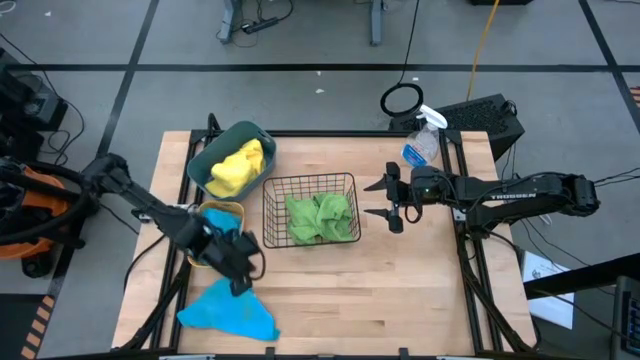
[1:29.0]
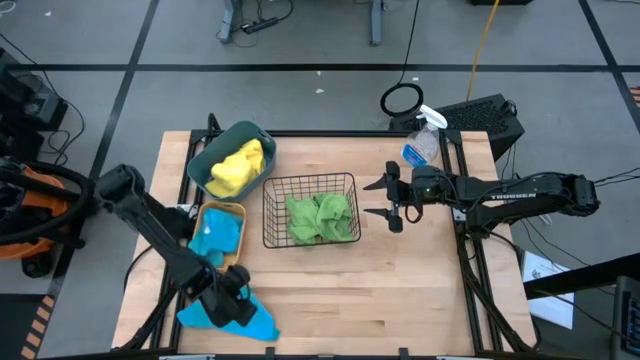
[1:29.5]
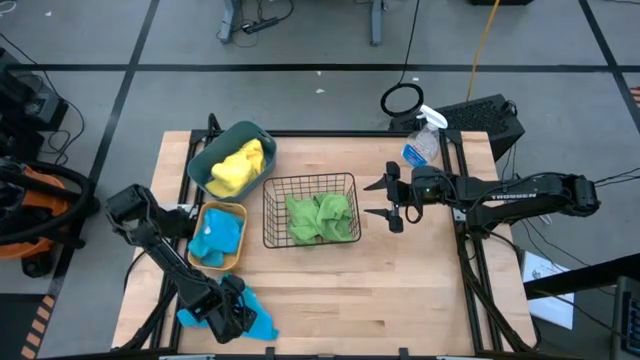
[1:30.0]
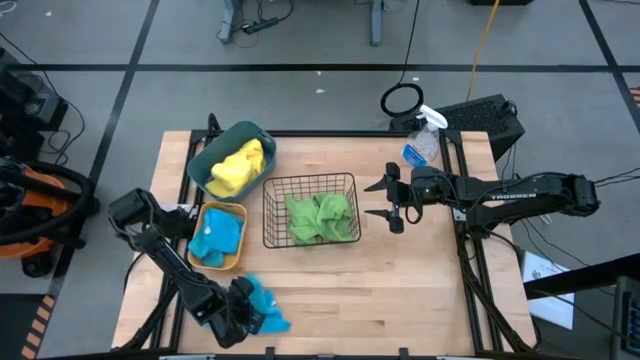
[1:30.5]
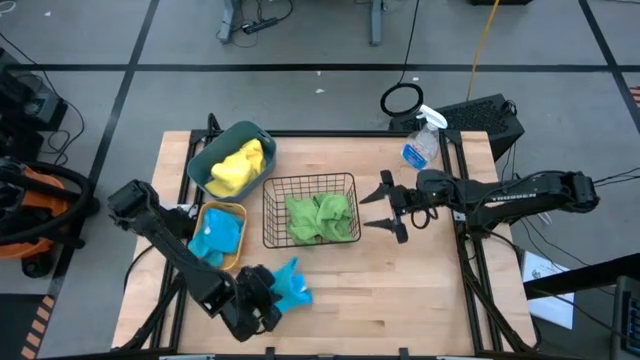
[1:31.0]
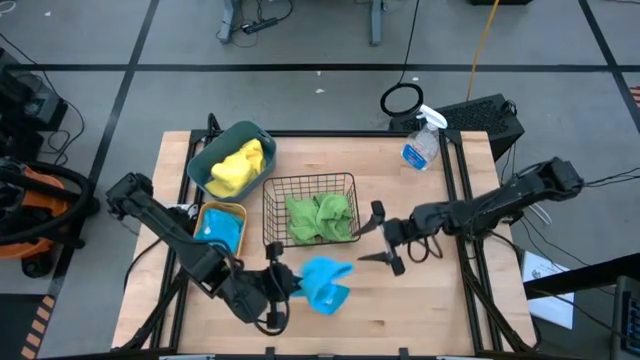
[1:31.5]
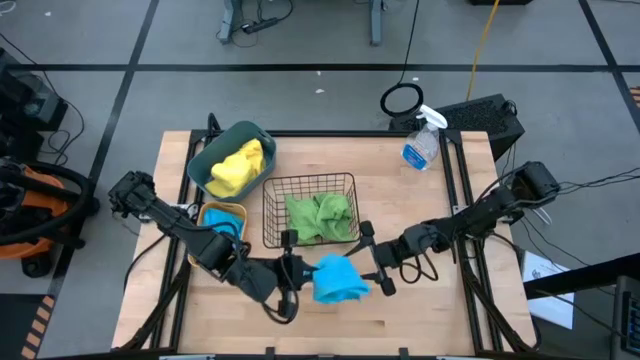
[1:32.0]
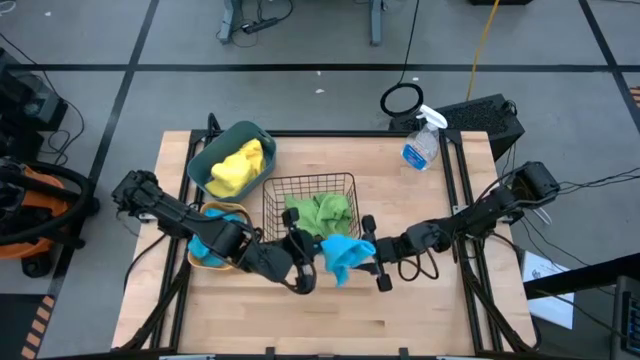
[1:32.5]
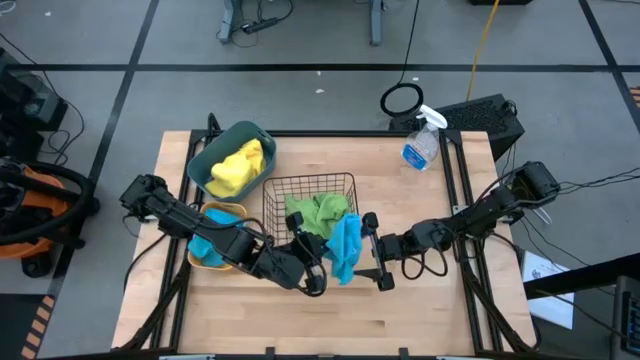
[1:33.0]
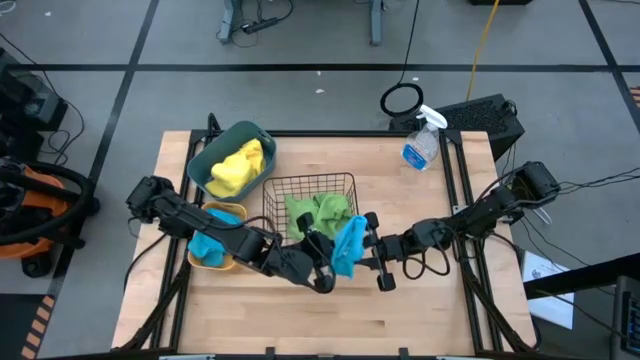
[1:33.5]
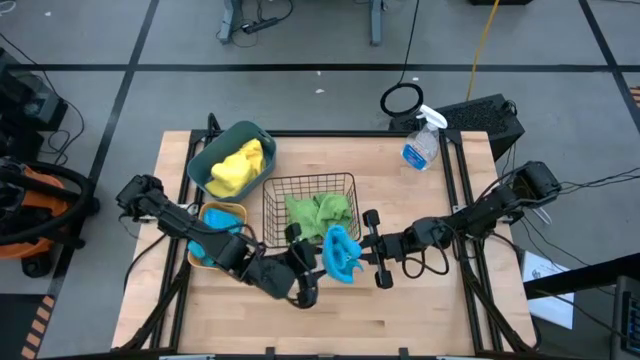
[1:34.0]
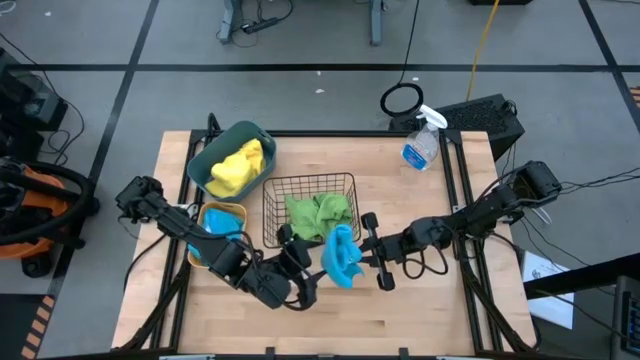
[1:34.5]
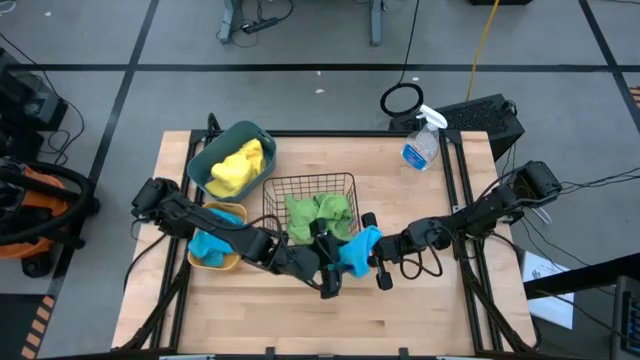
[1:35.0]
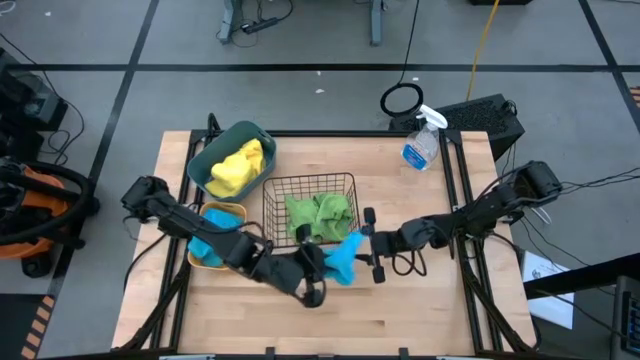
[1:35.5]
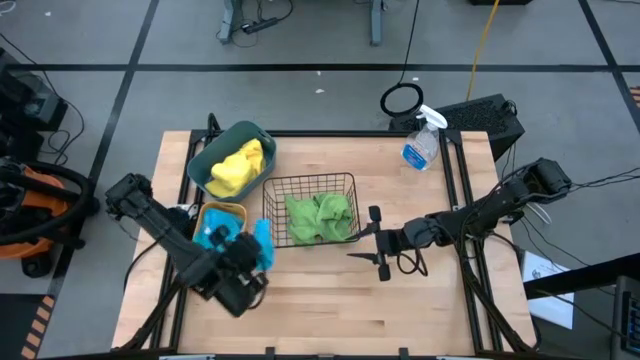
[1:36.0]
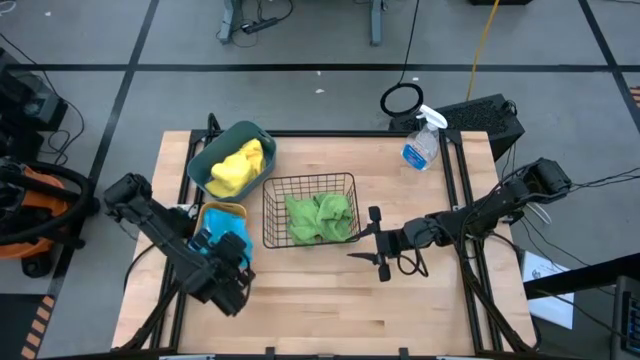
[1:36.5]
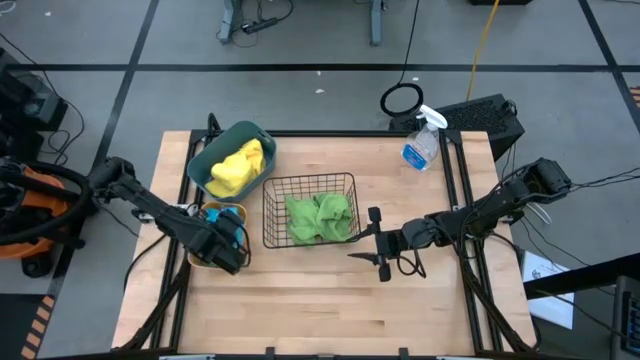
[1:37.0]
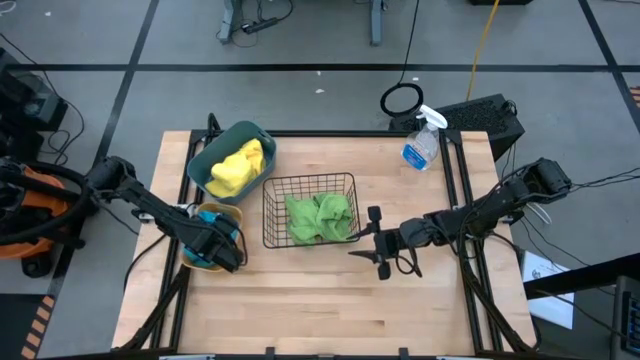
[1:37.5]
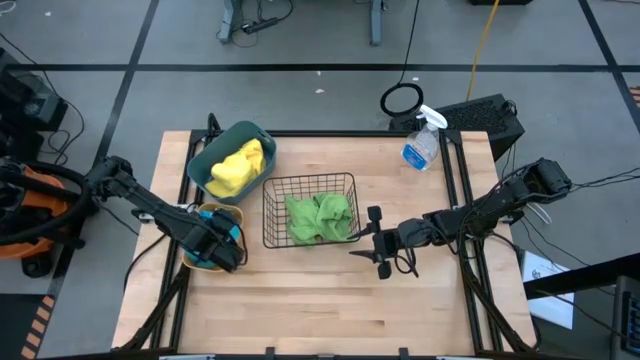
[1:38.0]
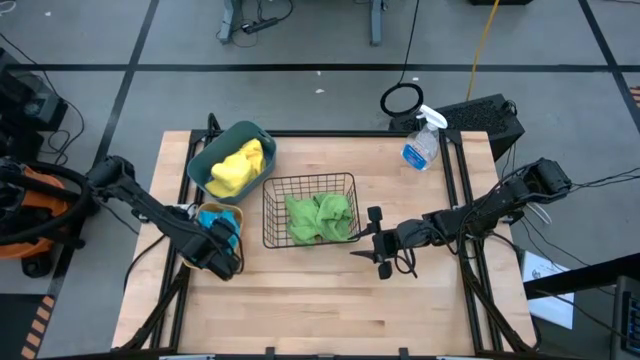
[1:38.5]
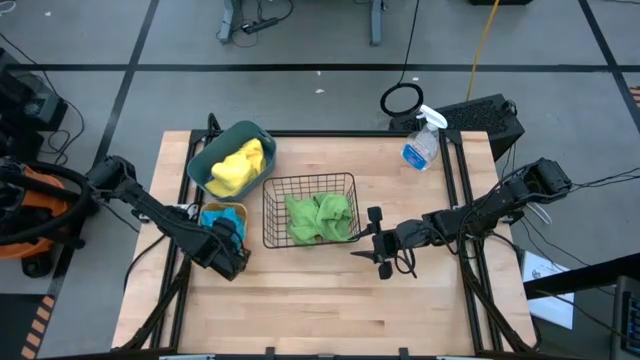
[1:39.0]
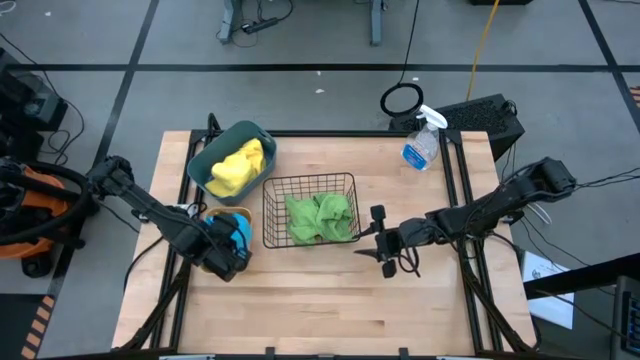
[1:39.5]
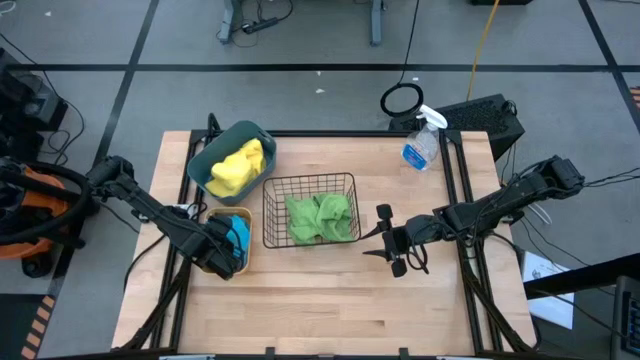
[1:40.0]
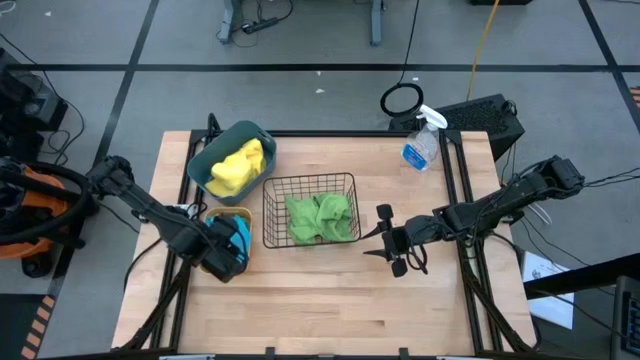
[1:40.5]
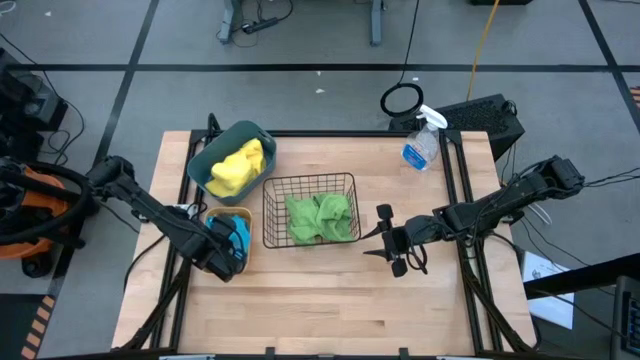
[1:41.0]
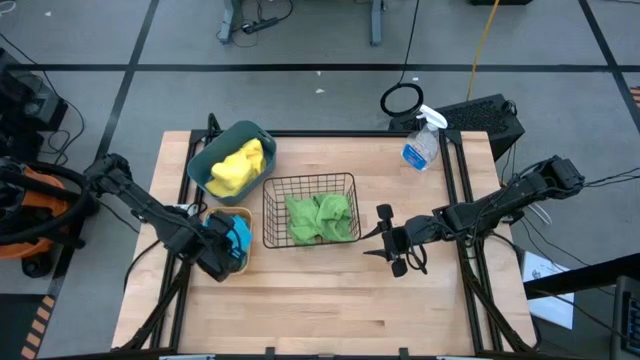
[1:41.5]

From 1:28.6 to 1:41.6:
Task: Sort microfiber towel by color & place in baskets
Put the blue microfiber towel into the yellow bin

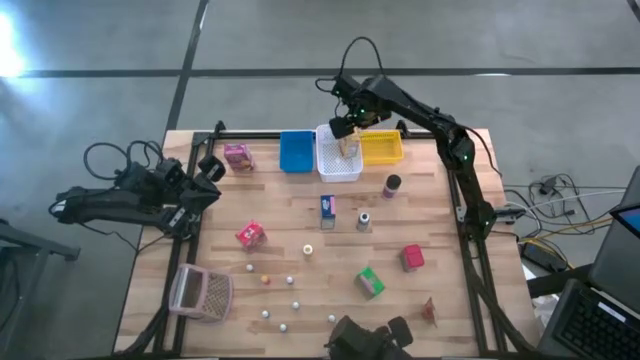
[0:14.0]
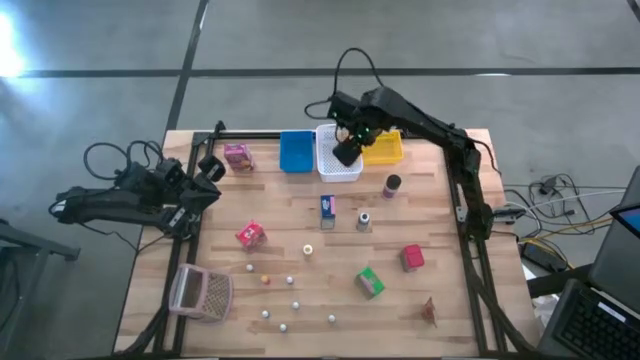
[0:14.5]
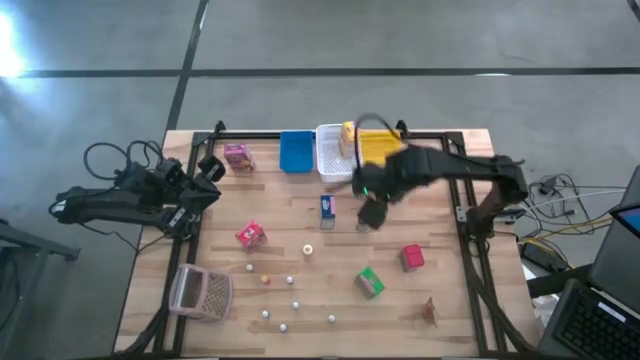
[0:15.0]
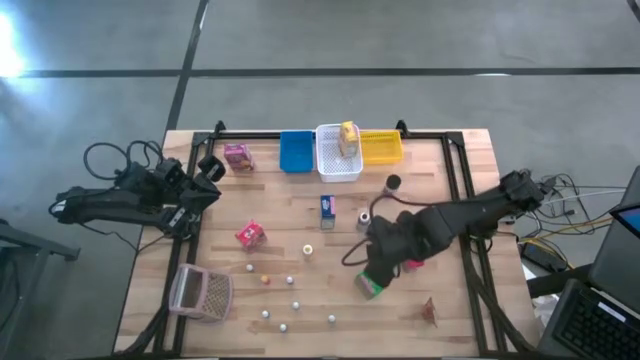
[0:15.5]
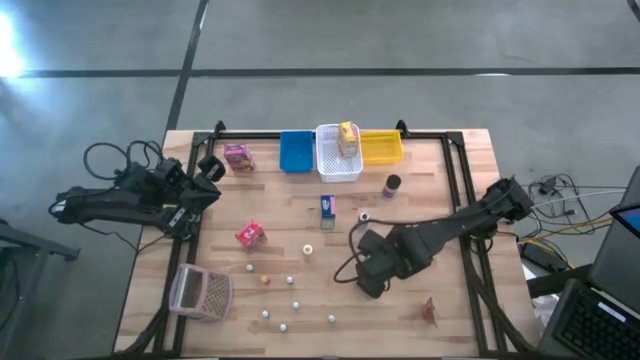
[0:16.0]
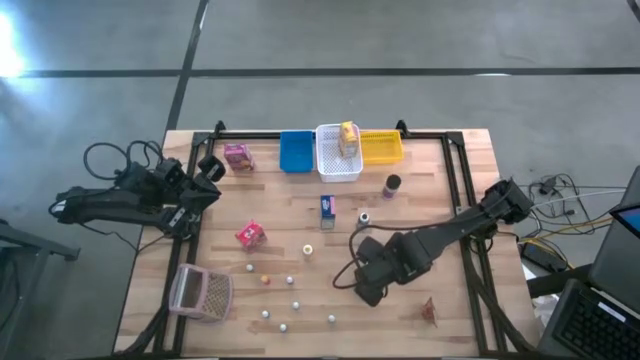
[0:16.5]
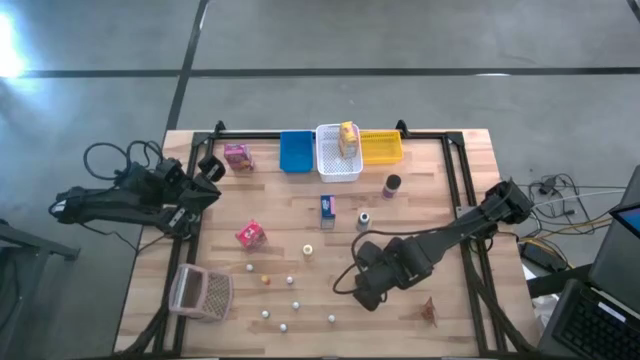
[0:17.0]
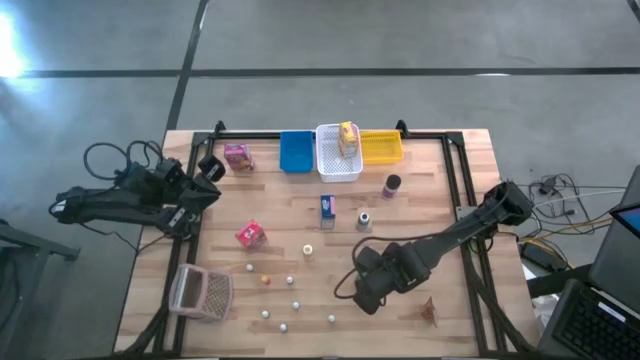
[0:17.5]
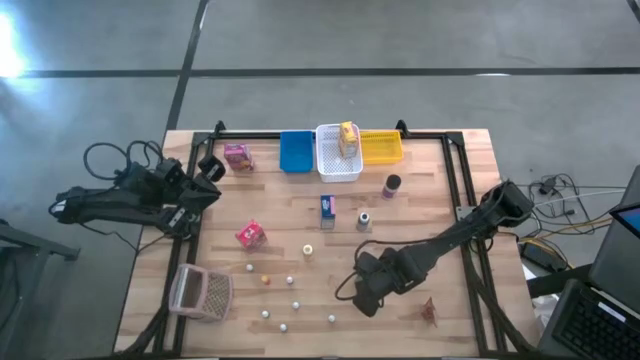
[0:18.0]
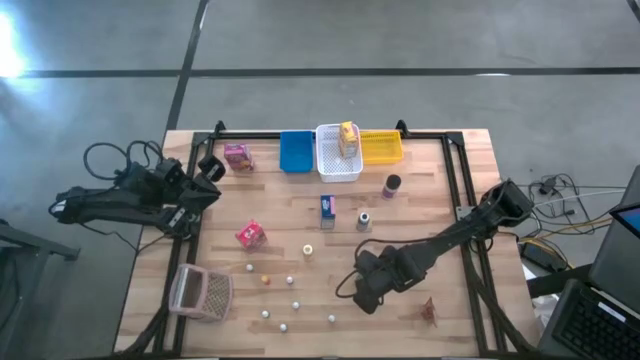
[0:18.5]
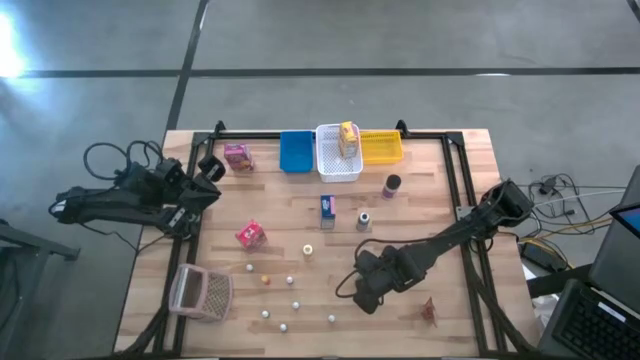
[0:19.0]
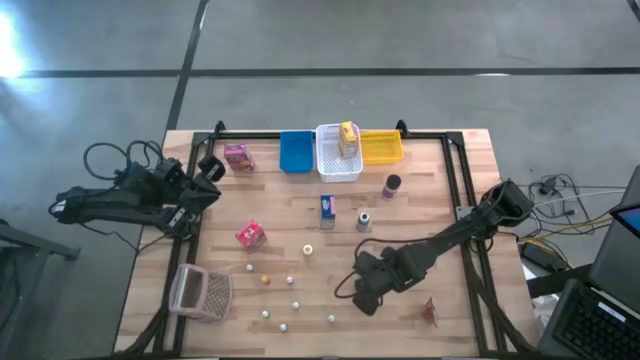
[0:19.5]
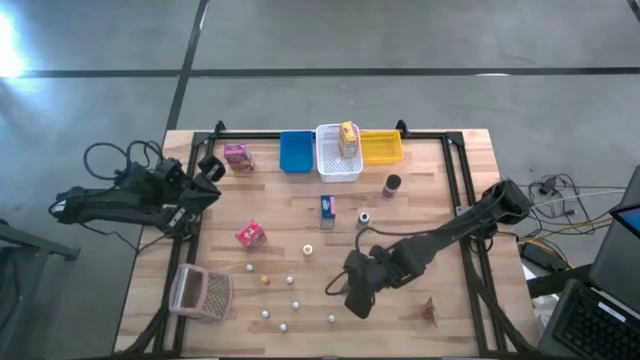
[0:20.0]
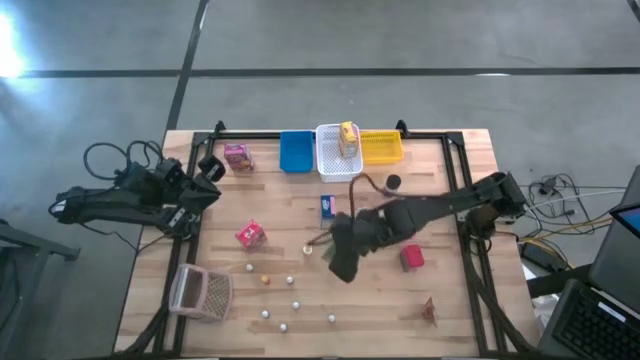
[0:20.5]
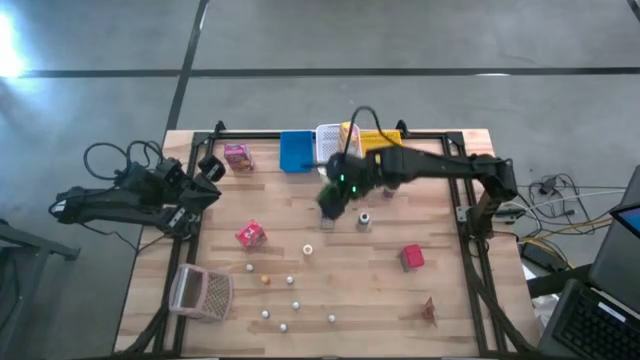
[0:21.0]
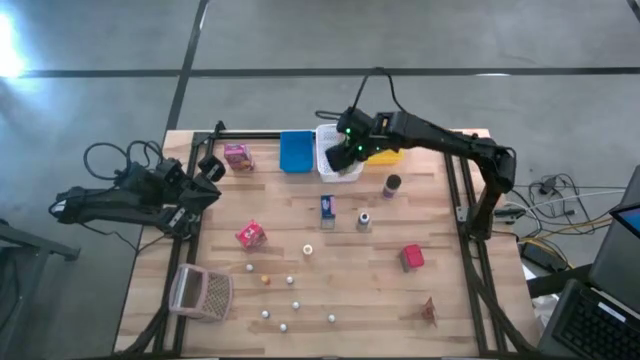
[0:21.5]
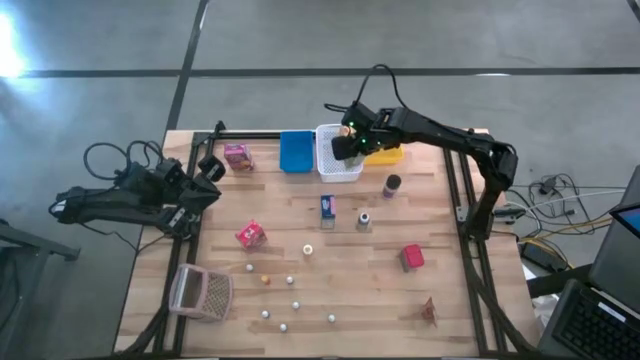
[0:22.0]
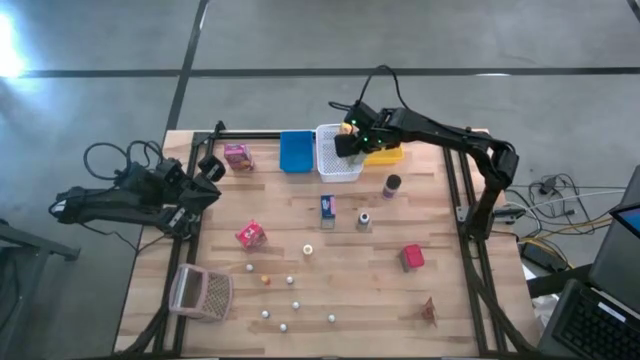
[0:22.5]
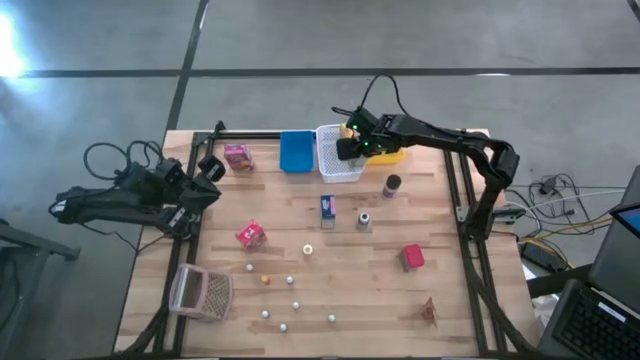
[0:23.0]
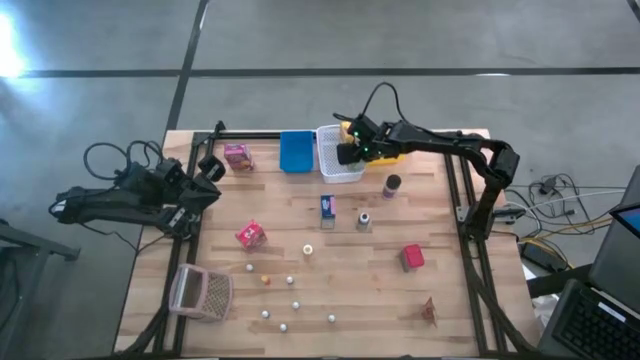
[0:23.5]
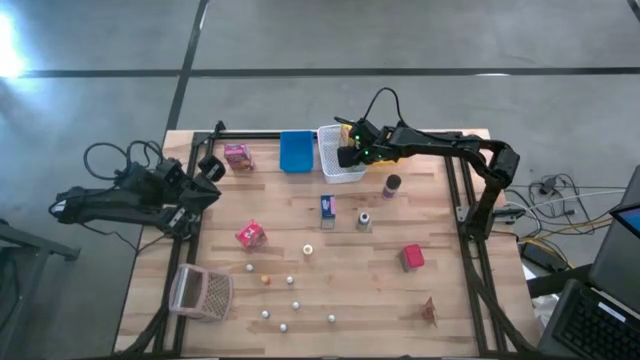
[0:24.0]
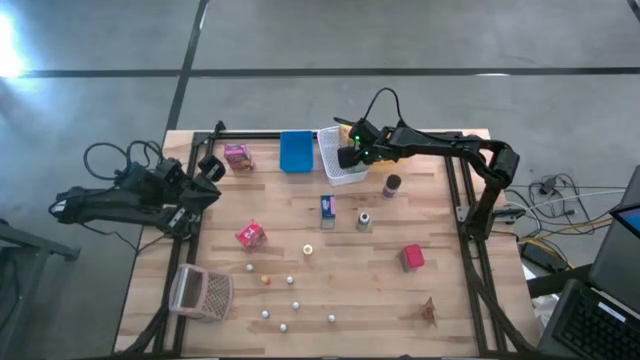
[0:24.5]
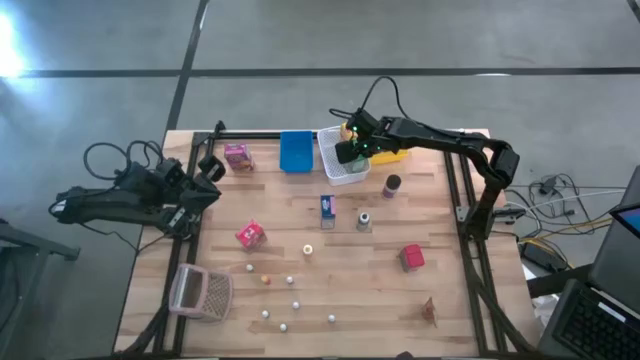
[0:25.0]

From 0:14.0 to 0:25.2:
Task: Pick & Place Kitchen Items
Put the green cereal box into the white bin
